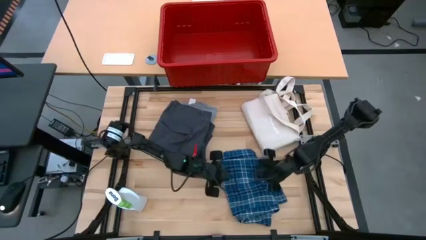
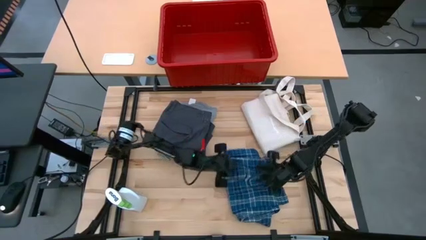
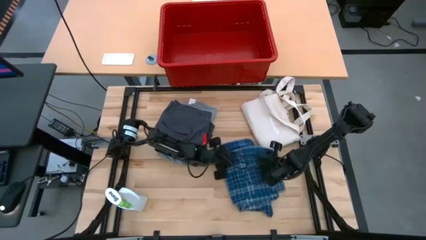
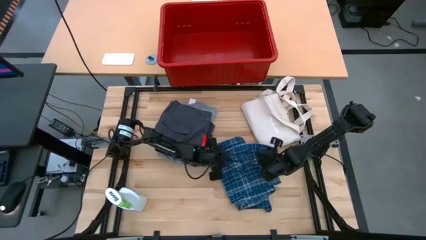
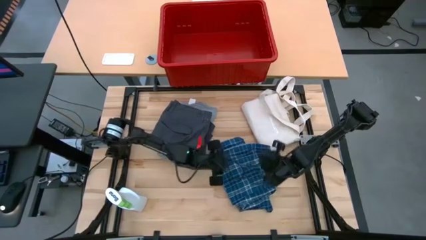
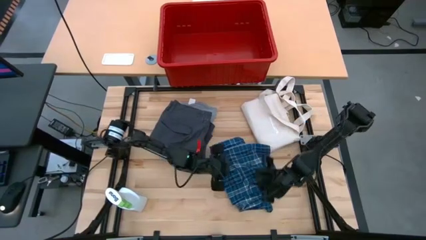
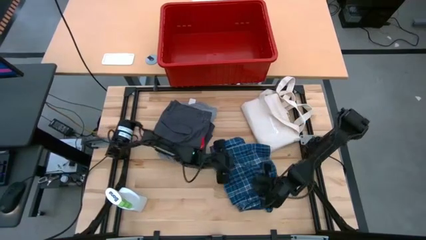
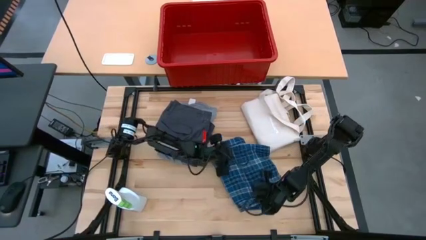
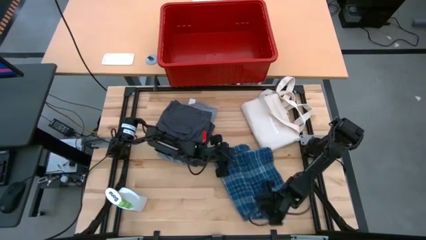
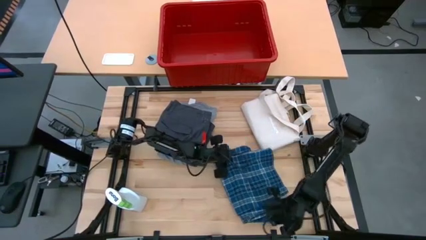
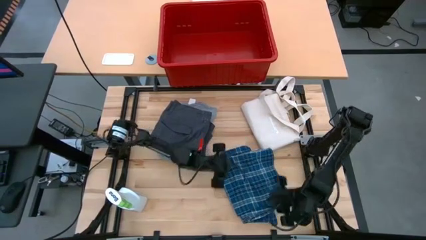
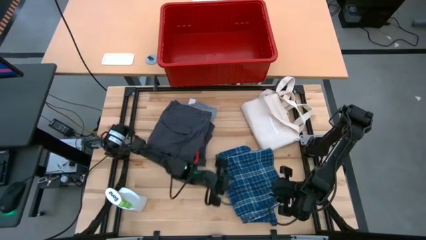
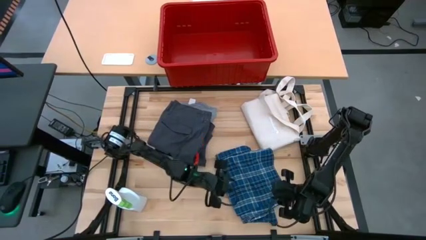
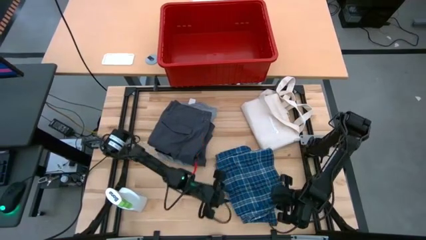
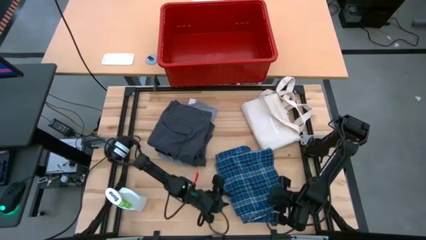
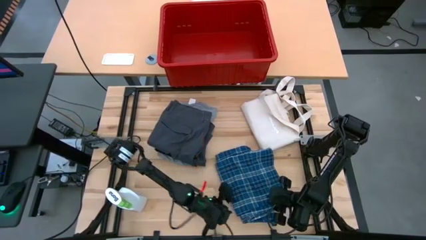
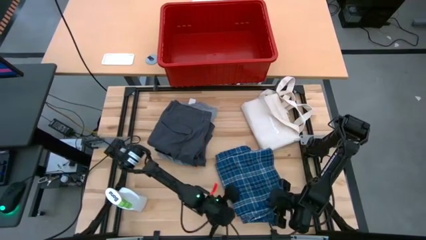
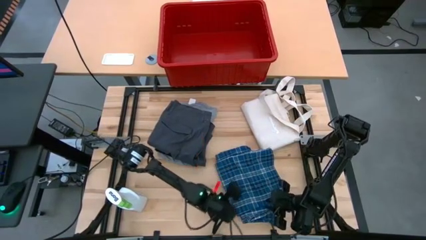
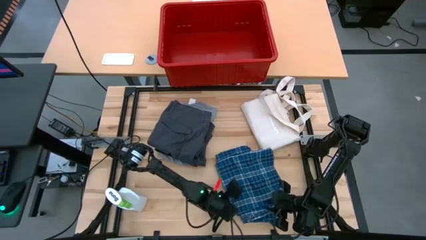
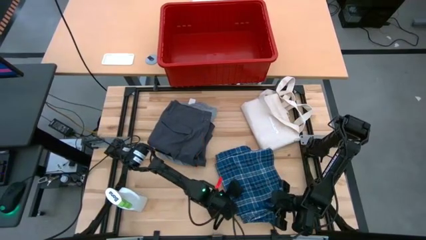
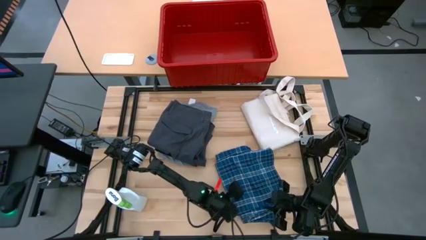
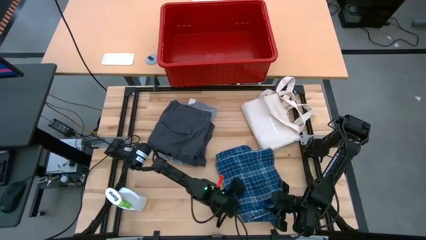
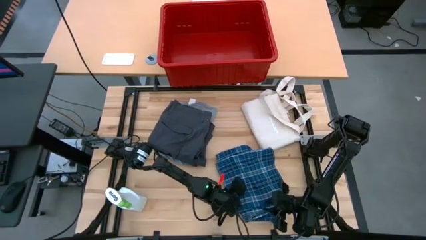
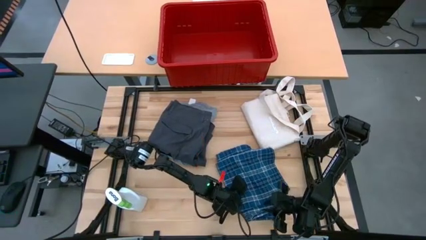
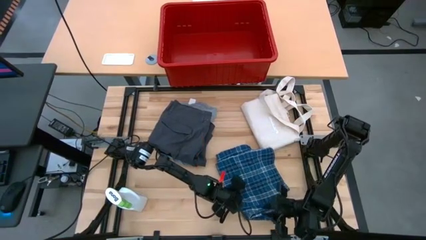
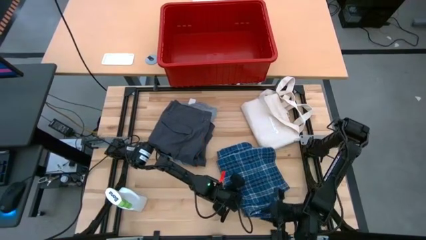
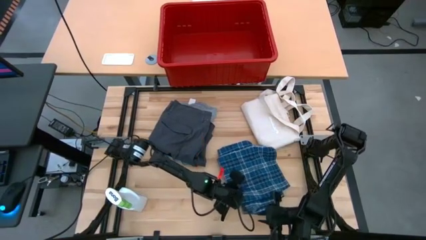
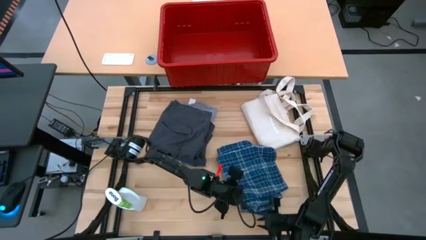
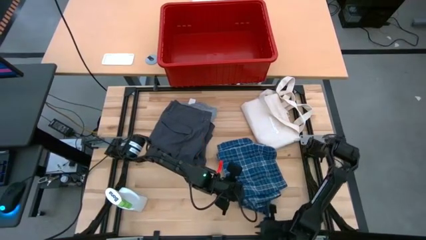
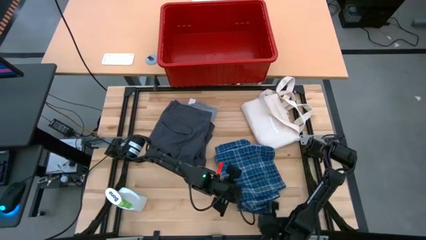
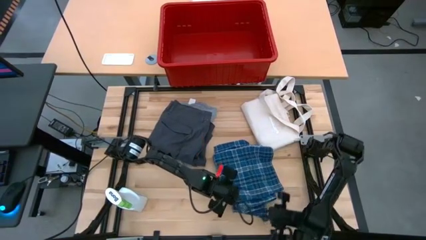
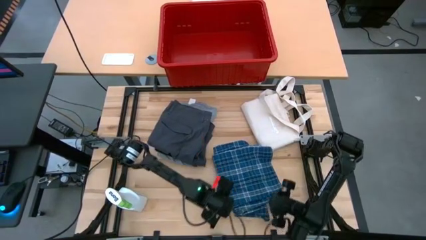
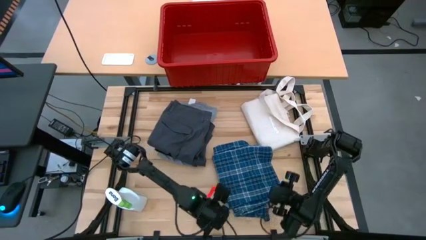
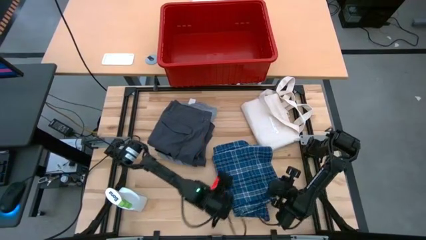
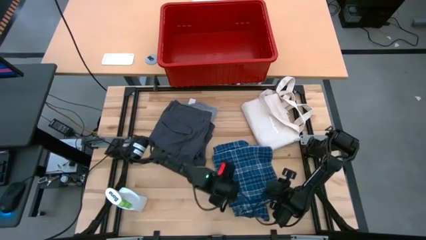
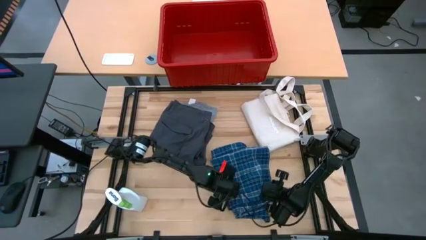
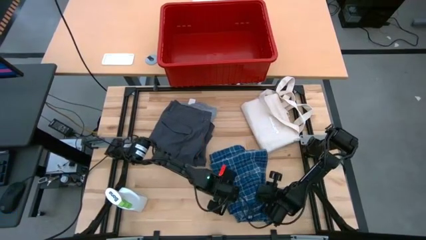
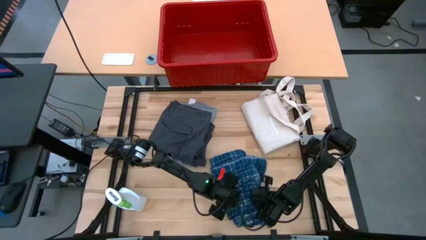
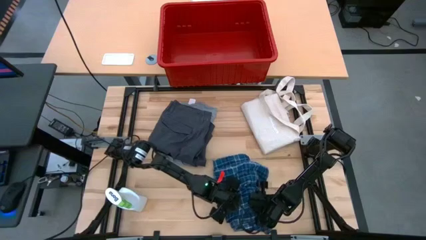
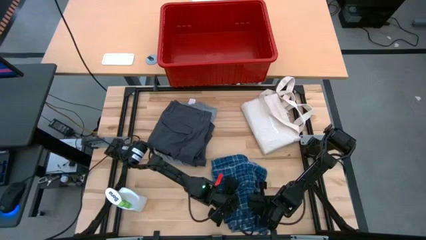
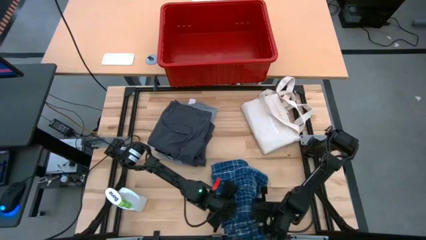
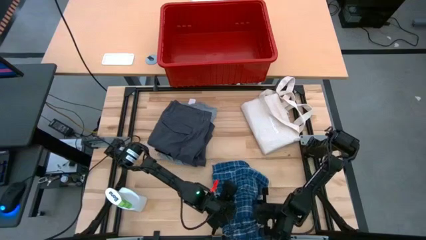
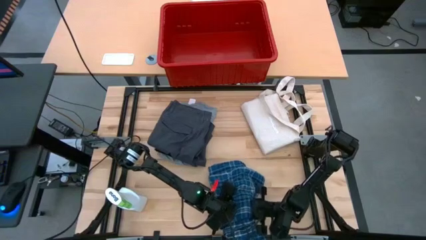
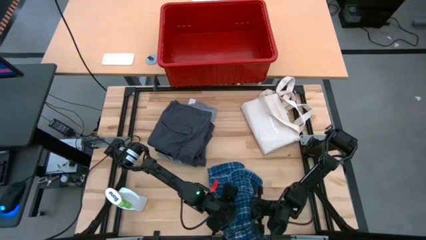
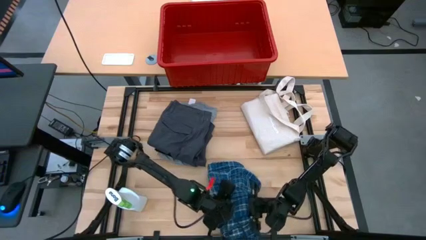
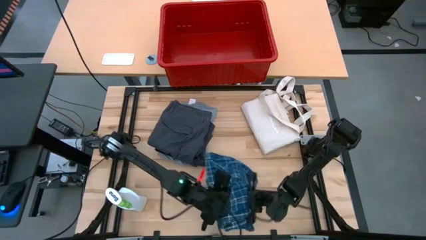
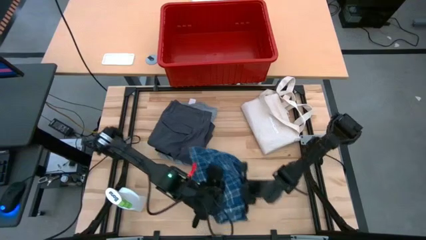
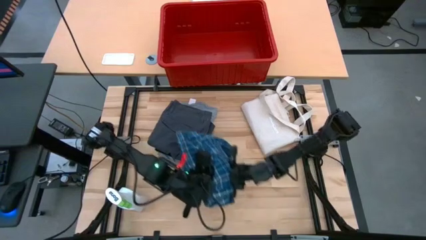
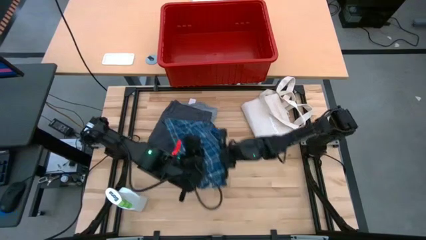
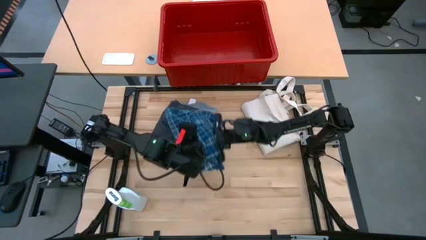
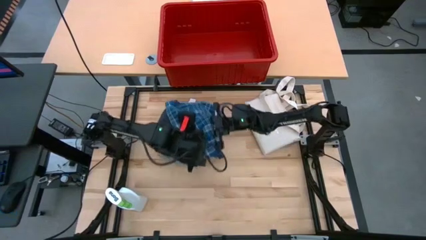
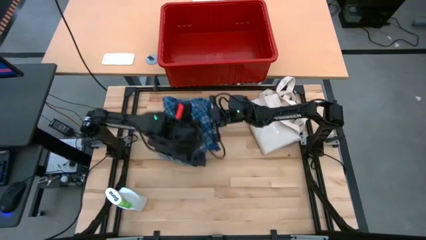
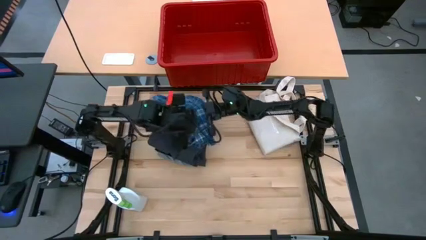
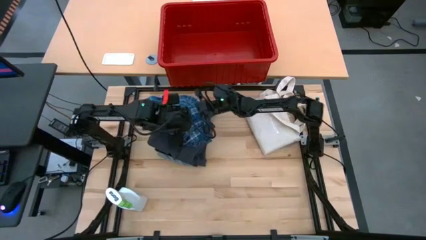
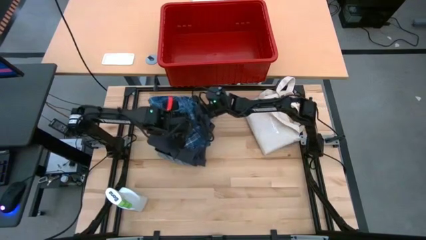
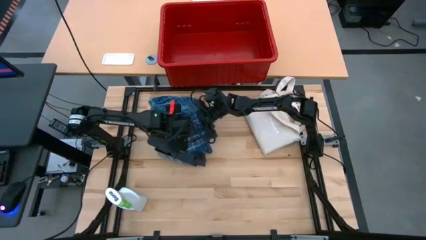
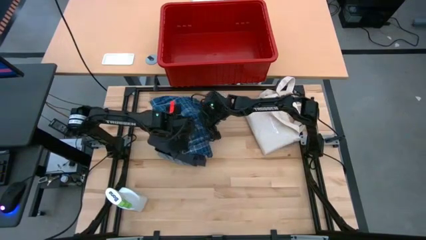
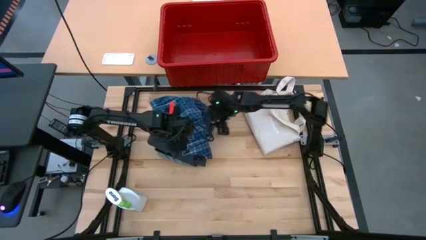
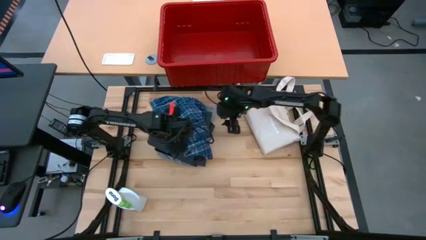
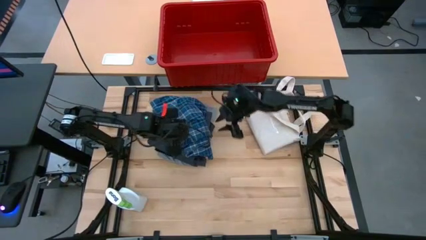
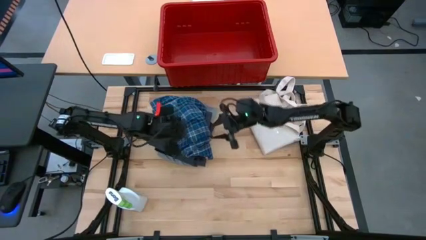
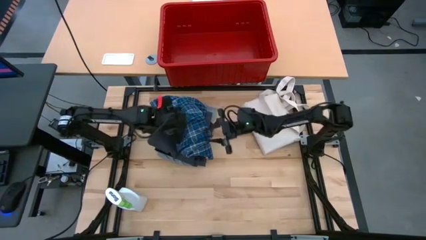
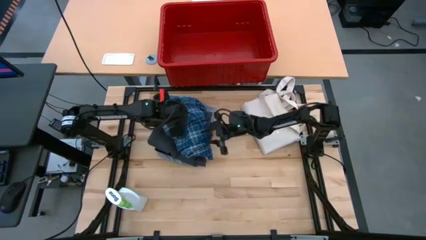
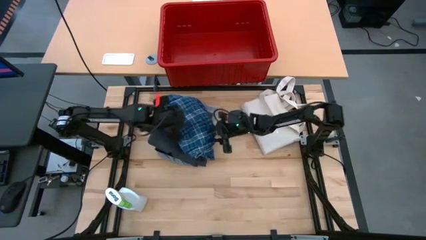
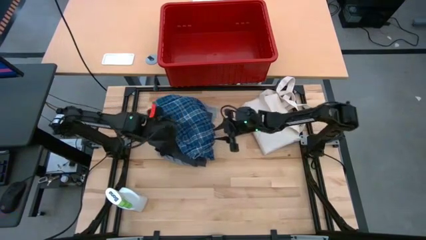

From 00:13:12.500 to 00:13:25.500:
Task: Fold Laundry from Bin
Remove the blue short from the laundry organizer

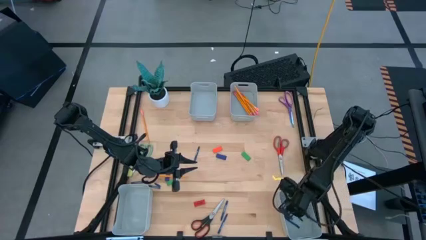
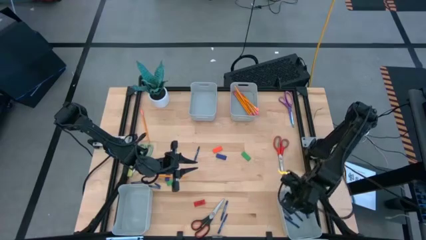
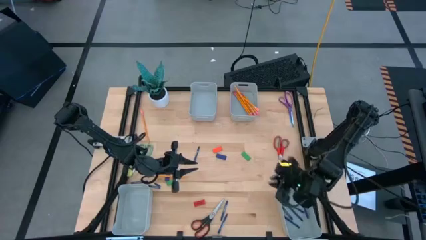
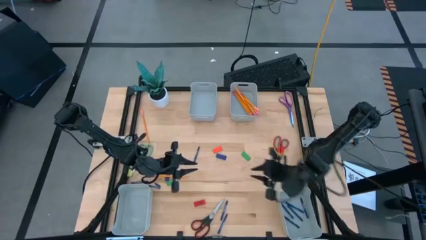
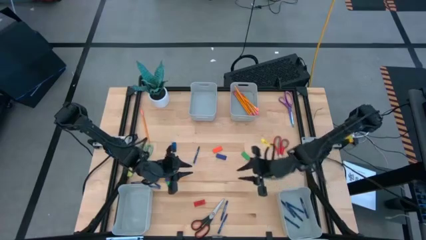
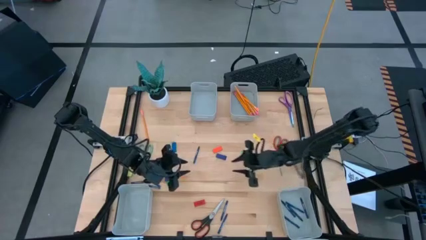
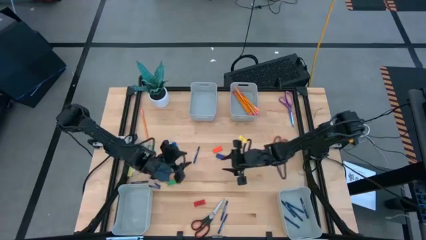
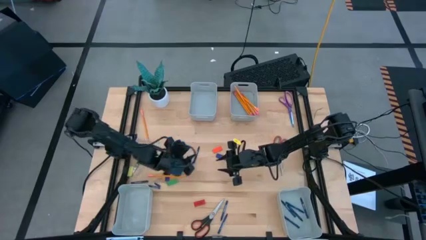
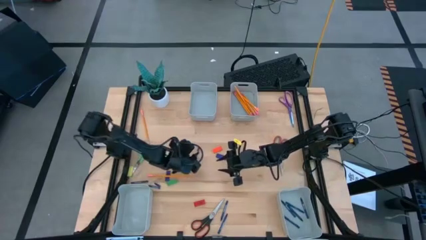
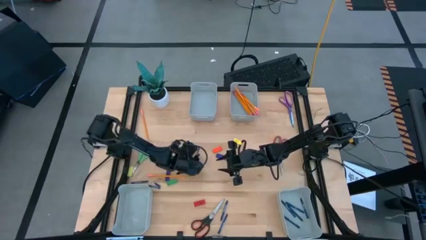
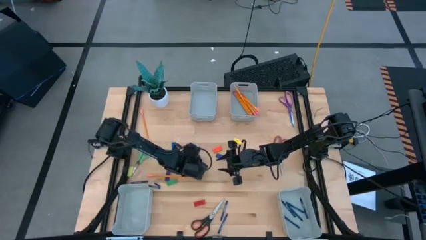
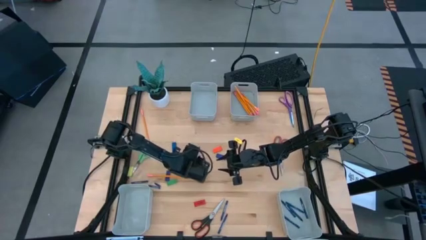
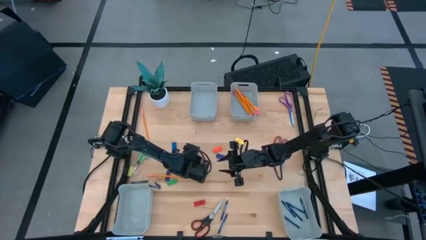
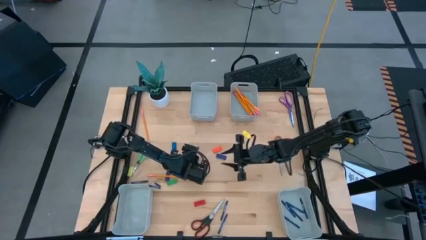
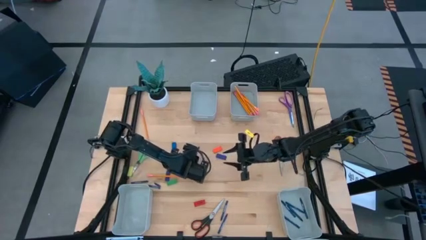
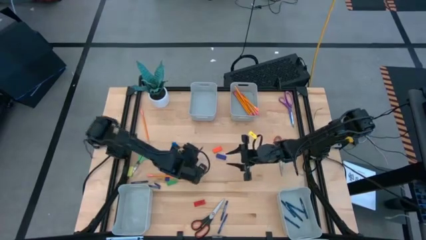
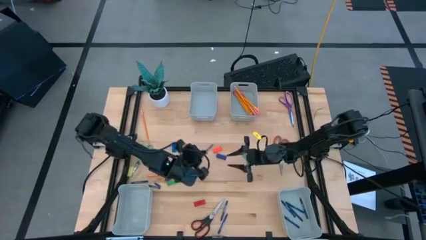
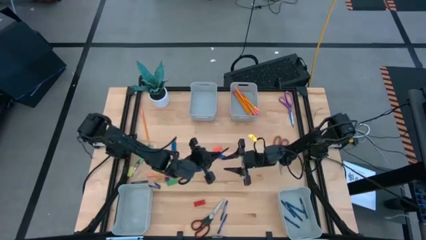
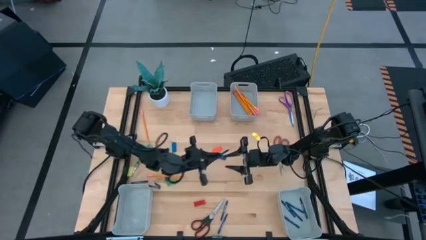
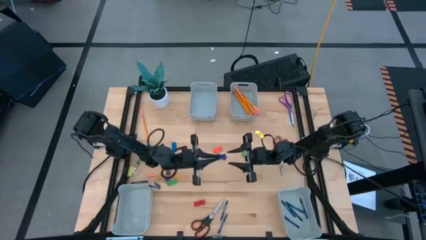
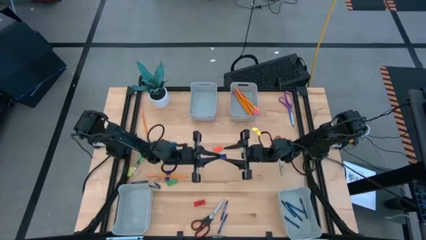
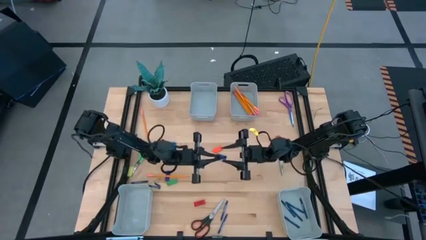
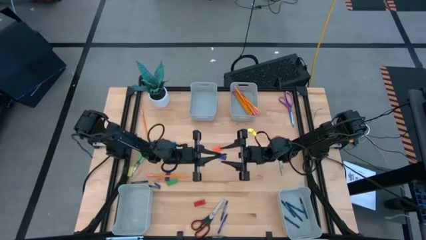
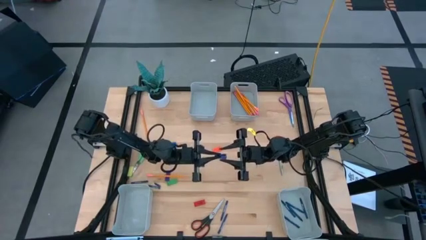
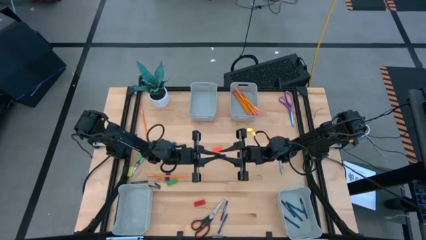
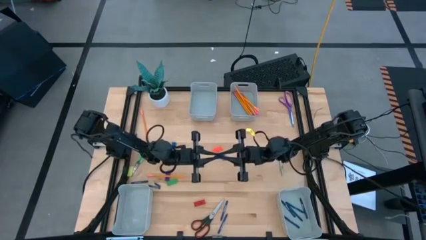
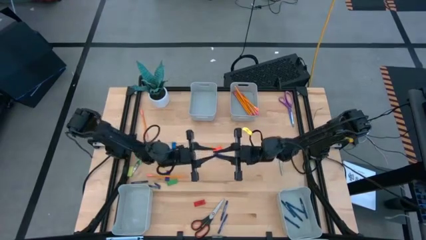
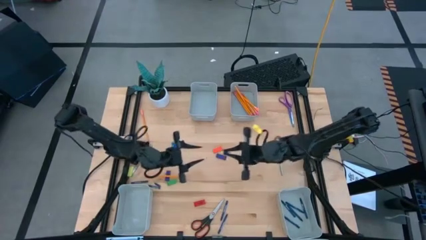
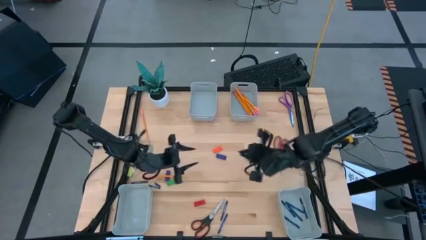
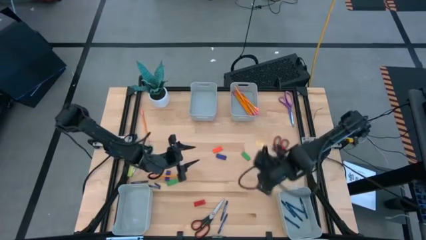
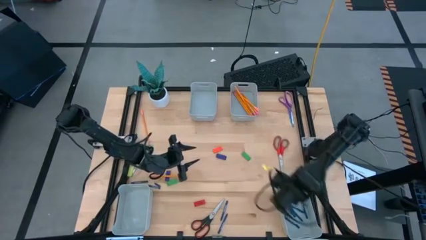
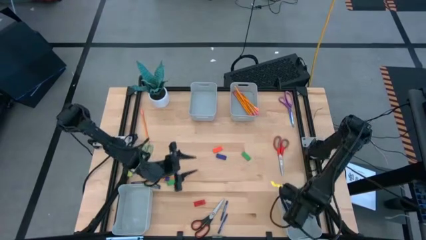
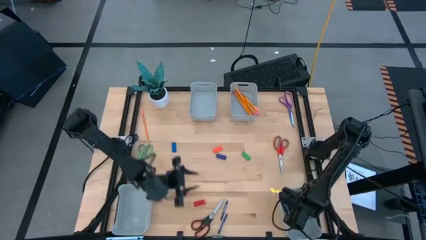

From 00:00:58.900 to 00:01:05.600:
Task: Sort crayons/erasers/pens/pencils in bins
Put the blue crayon into the bottom right bin
